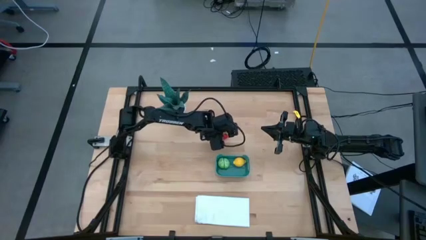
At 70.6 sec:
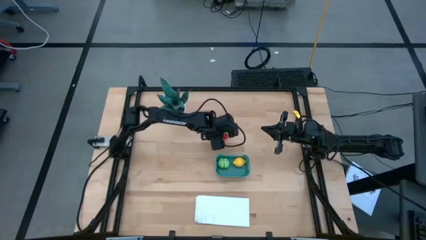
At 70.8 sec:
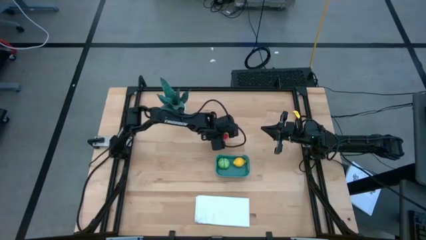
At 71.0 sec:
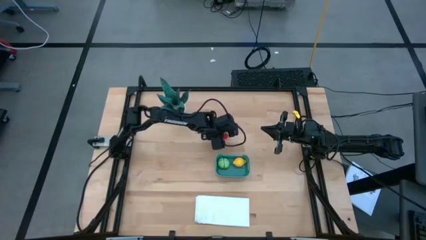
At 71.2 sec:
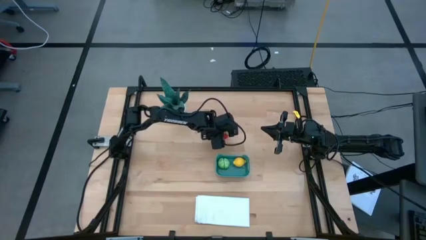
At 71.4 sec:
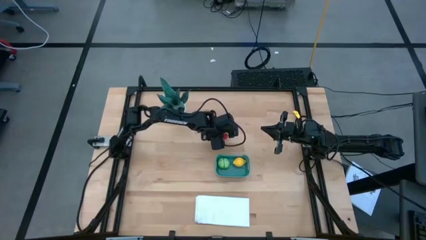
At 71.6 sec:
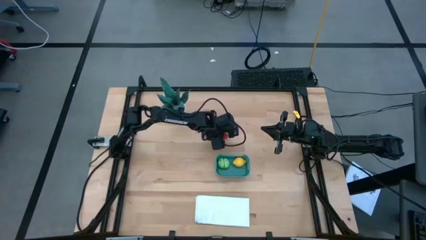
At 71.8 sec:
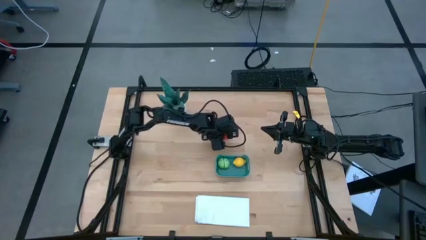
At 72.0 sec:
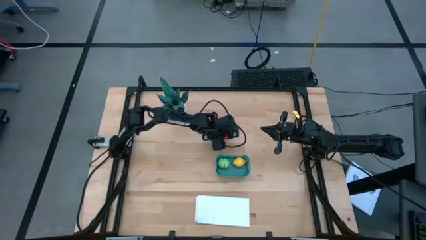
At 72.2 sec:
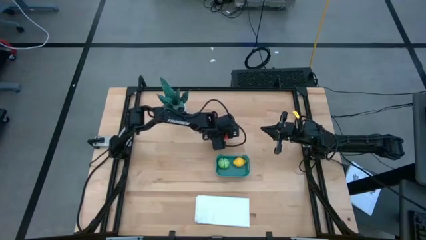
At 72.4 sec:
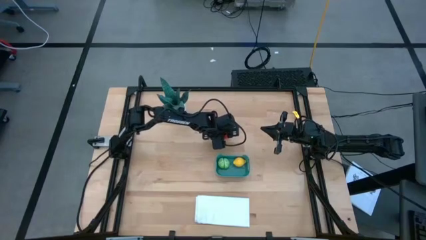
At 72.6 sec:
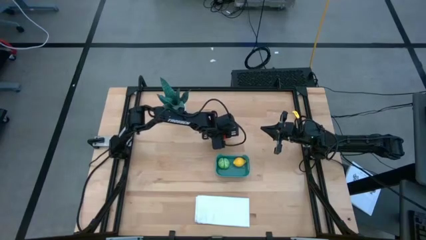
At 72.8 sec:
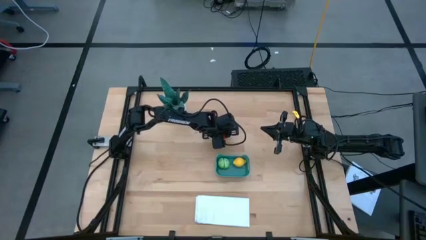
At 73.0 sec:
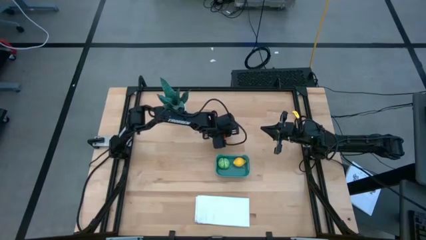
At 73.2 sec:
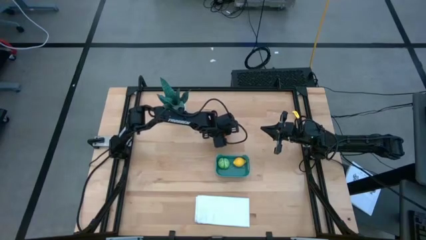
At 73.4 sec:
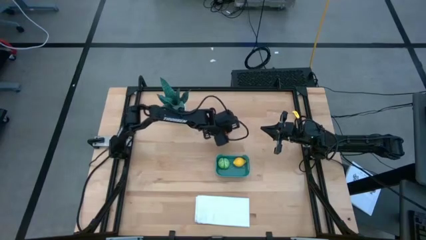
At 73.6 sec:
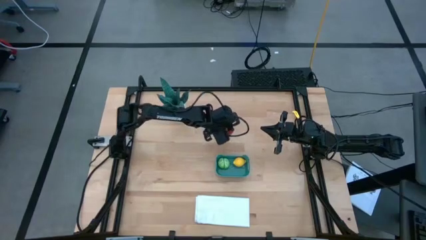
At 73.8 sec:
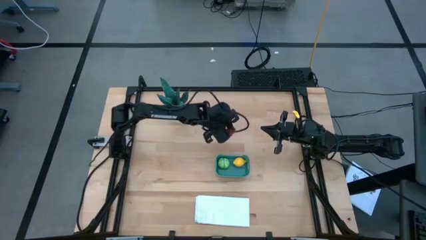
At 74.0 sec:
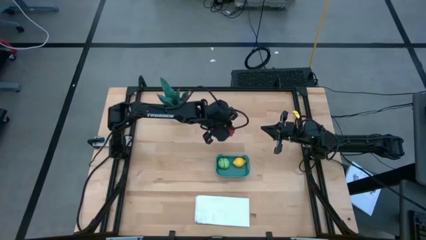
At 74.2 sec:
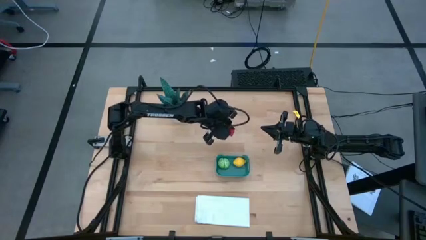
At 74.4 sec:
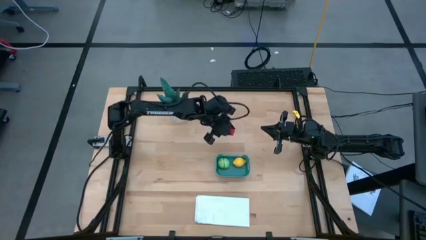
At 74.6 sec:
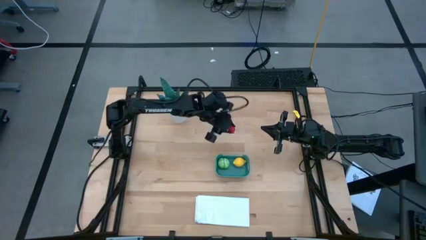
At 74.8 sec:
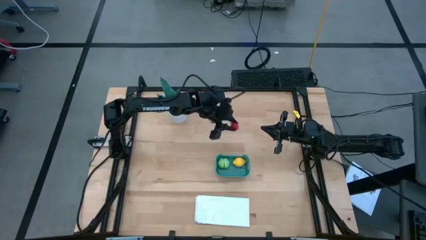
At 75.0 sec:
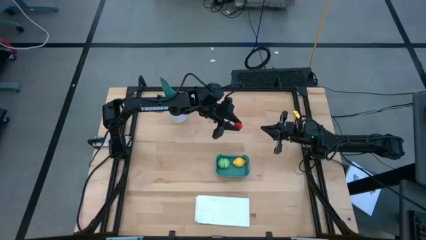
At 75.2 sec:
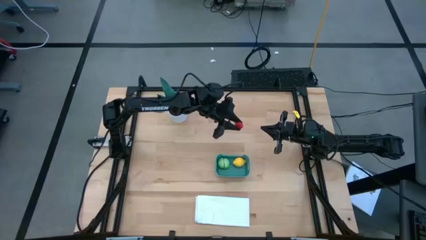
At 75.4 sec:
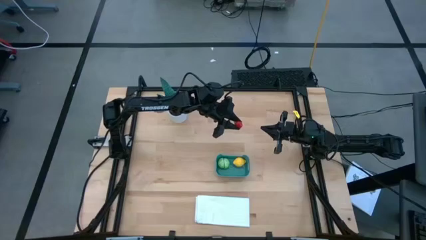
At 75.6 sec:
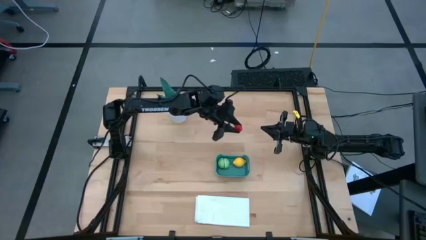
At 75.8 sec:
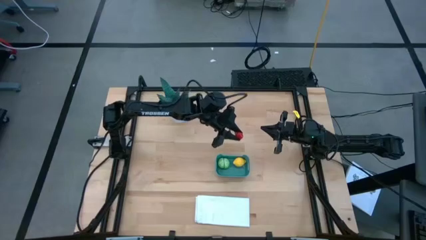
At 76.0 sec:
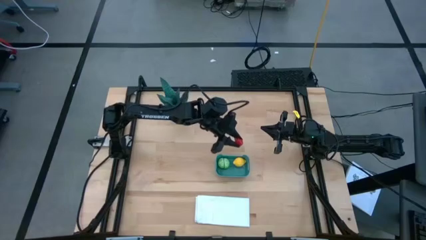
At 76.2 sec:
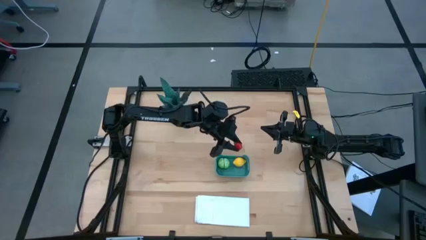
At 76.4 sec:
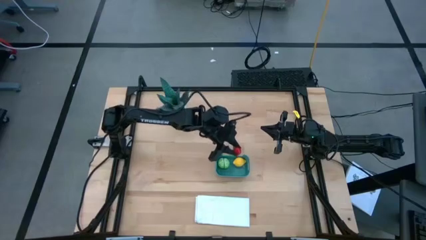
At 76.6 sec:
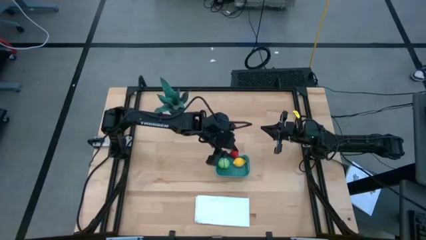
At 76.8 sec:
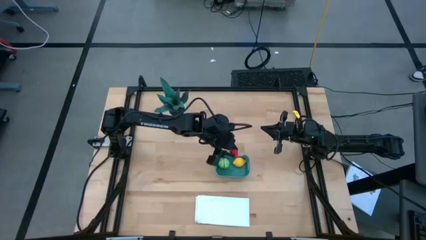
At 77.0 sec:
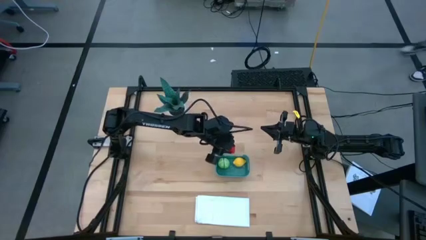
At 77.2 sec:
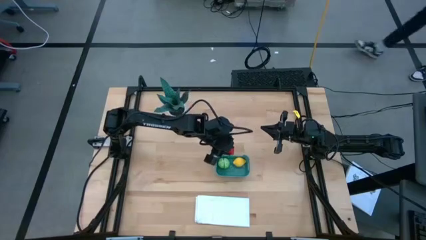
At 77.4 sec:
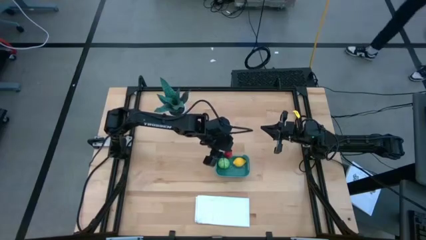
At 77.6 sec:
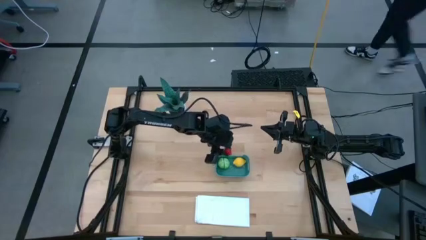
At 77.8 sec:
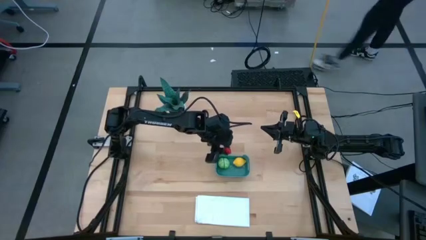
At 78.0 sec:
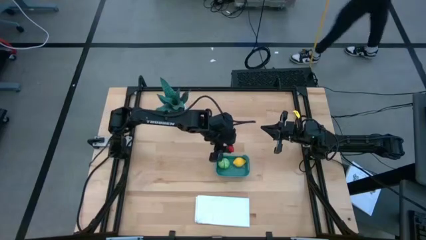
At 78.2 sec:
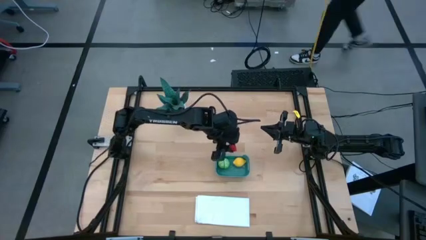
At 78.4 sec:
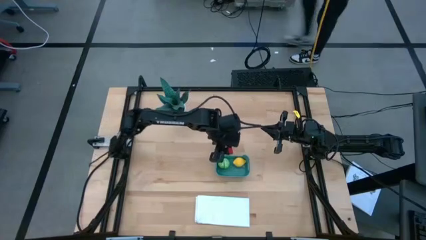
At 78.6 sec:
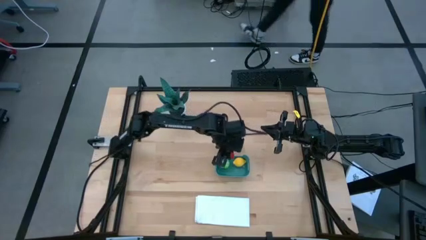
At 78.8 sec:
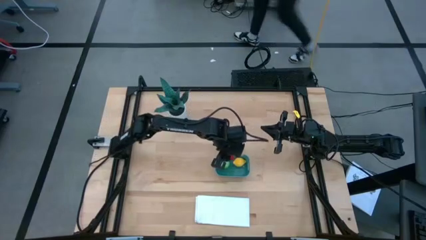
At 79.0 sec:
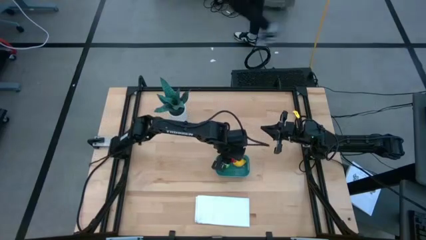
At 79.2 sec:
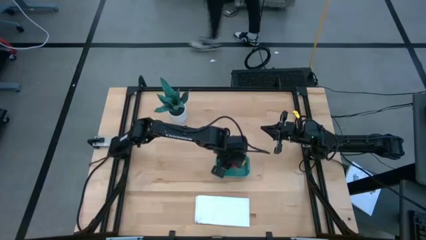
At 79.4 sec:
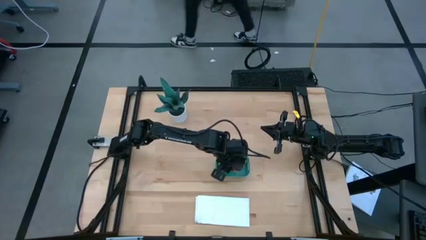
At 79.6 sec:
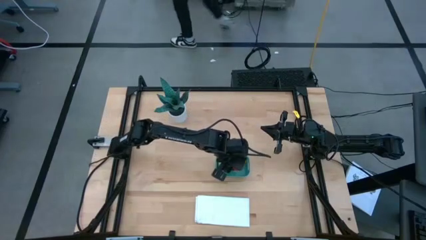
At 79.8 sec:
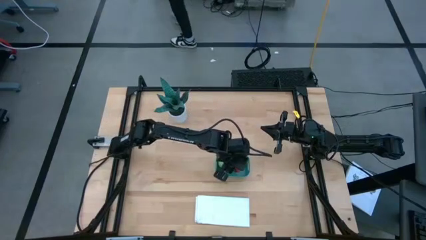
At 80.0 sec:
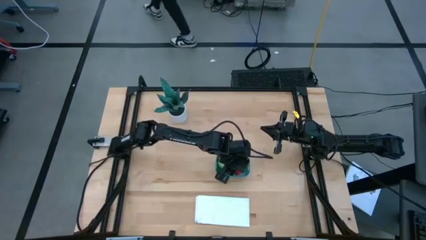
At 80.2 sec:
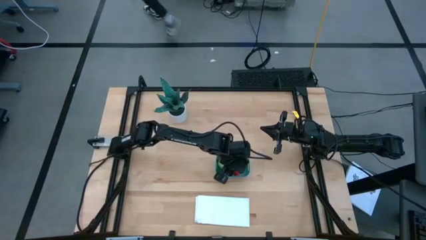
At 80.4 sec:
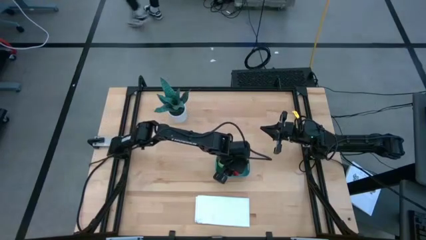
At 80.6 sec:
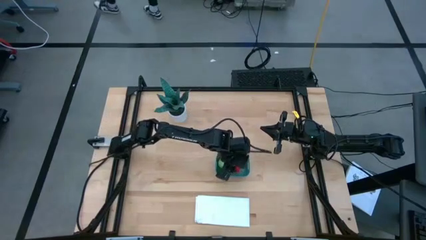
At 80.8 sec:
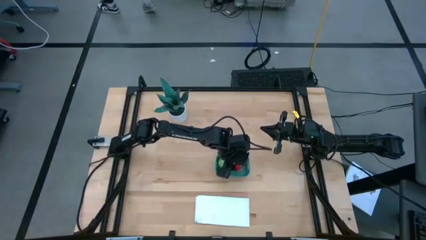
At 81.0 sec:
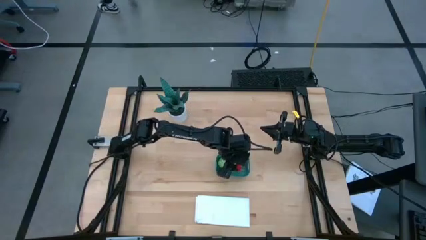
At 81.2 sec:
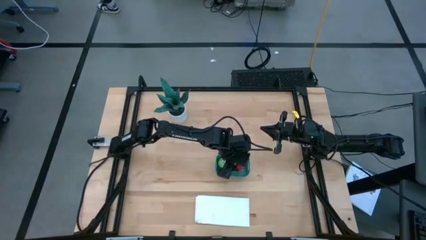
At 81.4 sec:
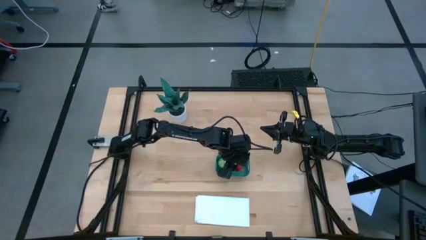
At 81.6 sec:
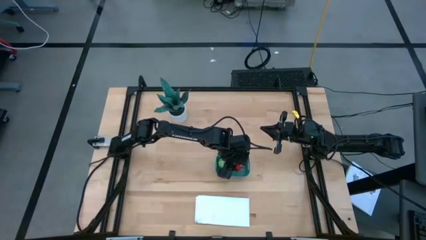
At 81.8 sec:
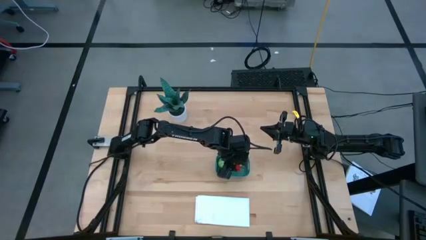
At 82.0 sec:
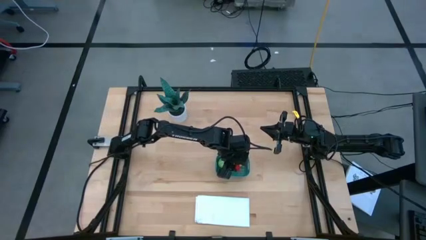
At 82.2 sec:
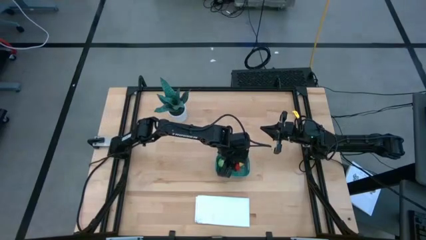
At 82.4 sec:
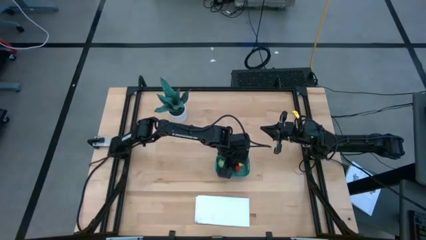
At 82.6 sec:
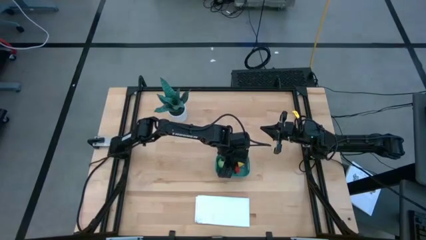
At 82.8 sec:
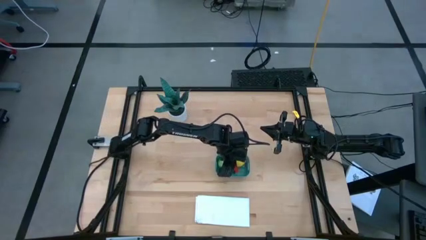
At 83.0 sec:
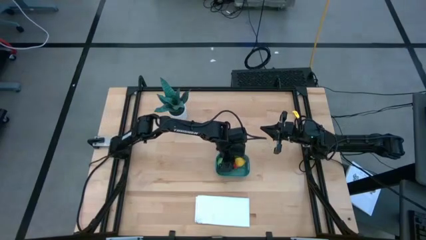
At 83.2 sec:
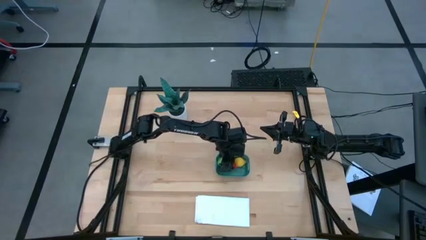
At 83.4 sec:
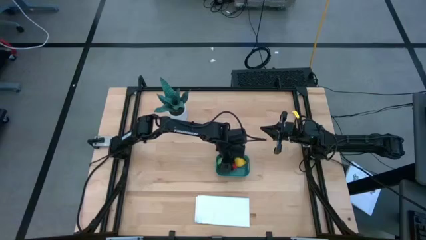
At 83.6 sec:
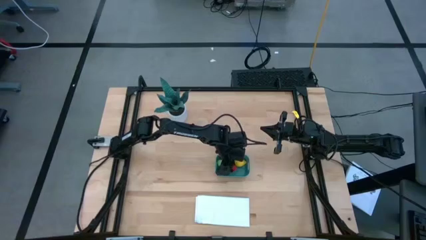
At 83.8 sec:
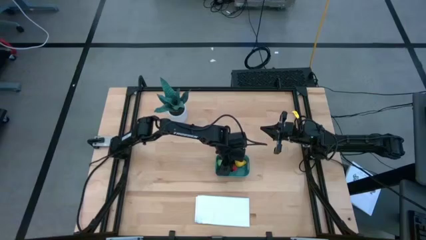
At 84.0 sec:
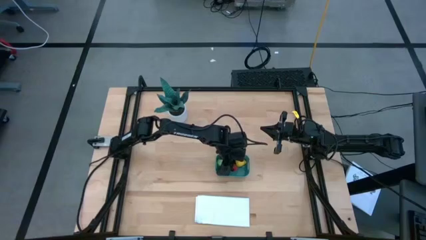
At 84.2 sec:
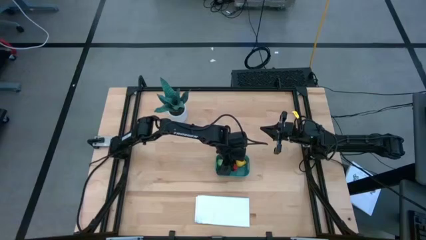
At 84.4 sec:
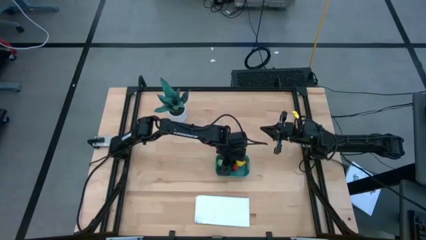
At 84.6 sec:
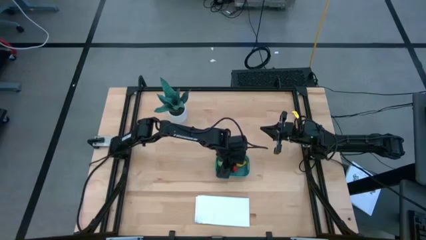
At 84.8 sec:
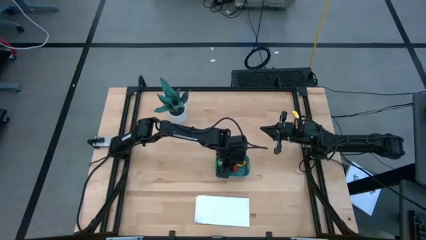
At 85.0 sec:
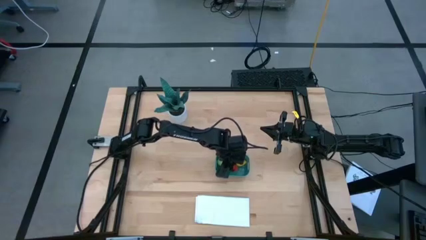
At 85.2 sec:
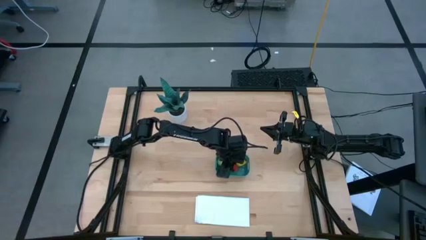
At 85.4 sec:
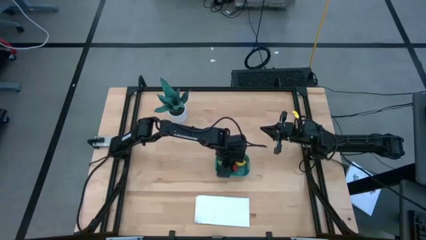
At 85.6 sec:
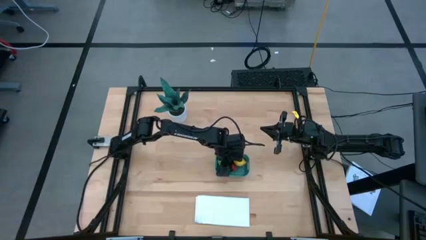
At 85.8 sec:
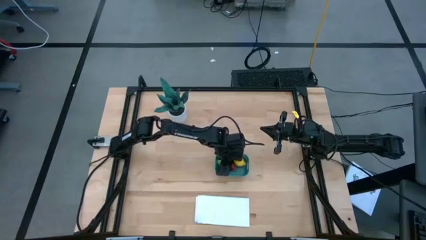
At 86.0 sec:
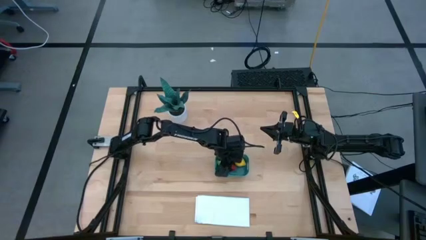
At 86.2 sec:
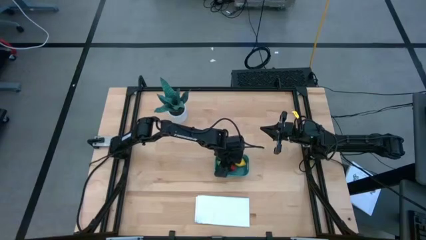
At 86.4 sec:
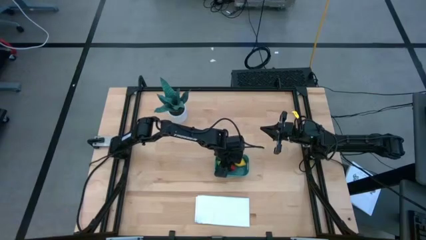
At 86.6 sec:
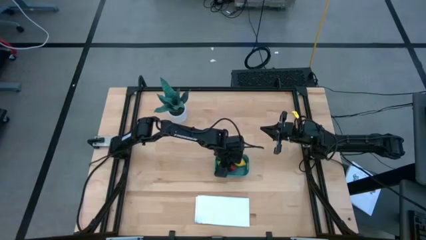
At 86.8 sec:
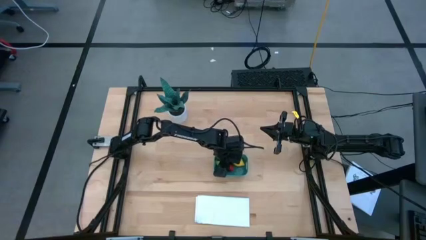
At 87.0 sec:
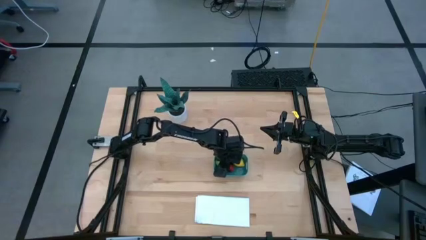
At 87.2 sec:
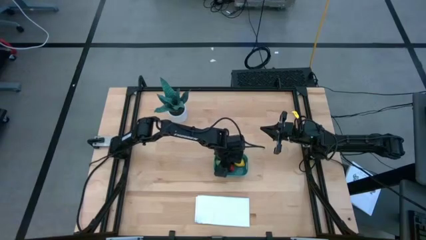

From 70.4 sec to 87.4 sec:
Task: Pick and placing Produce into tupperware
Put the strawberry into the bin
